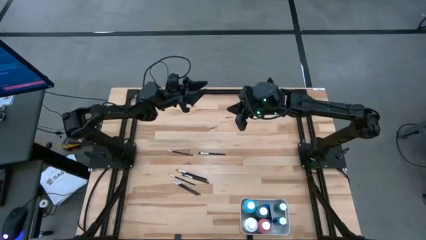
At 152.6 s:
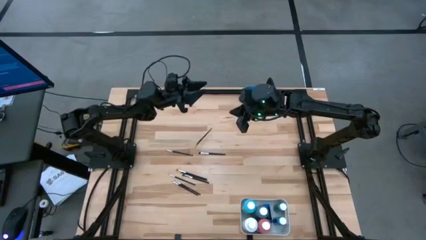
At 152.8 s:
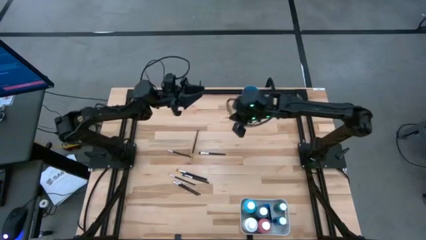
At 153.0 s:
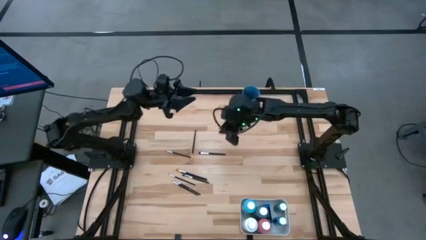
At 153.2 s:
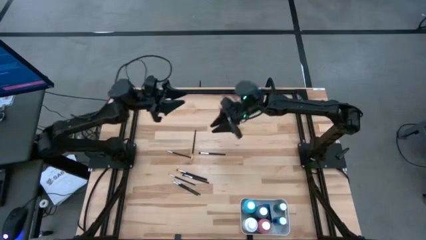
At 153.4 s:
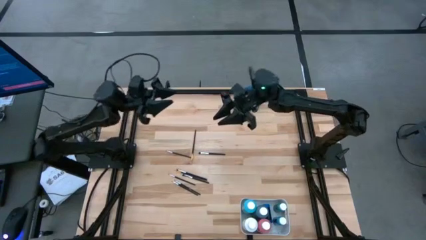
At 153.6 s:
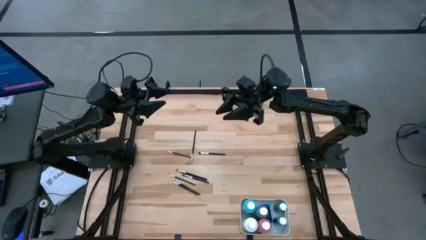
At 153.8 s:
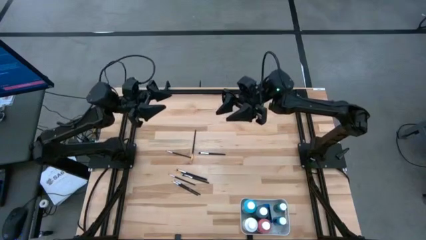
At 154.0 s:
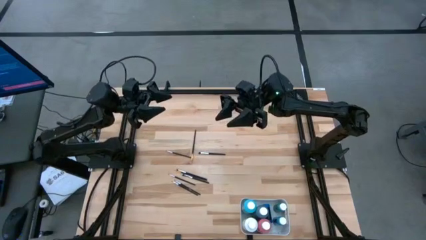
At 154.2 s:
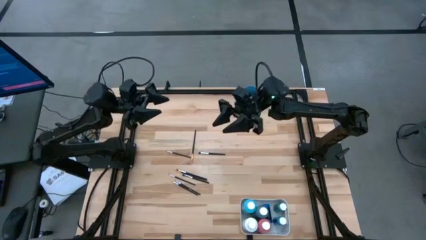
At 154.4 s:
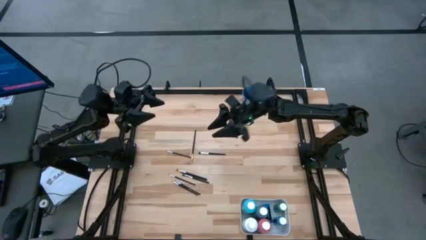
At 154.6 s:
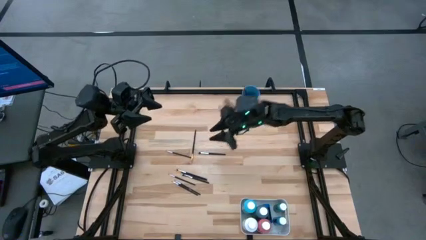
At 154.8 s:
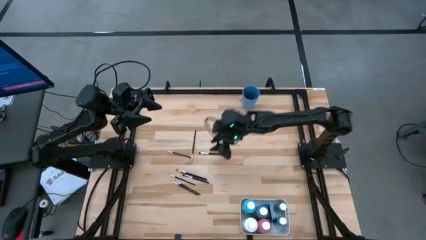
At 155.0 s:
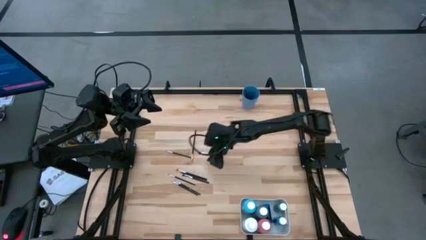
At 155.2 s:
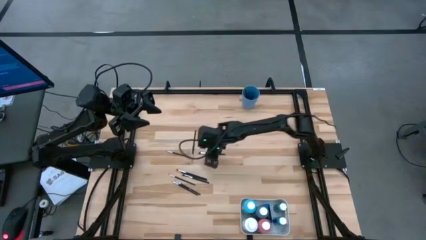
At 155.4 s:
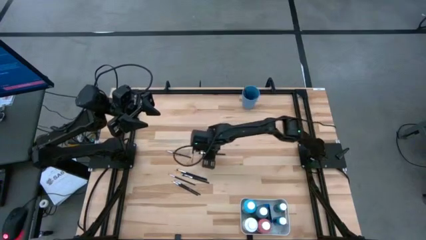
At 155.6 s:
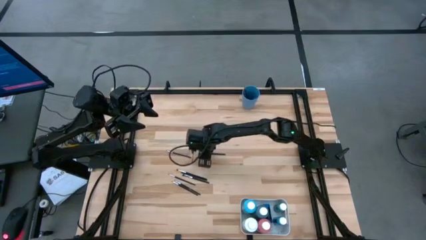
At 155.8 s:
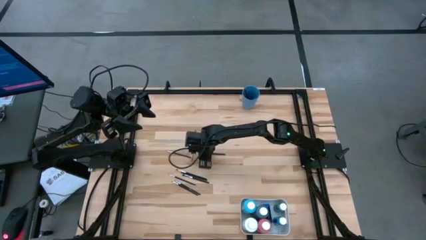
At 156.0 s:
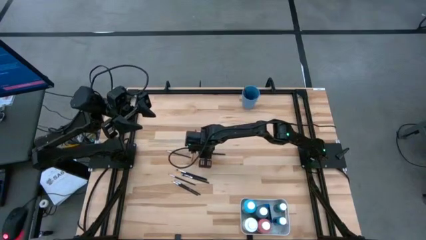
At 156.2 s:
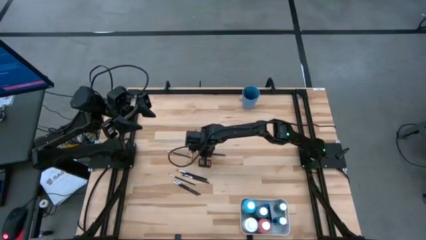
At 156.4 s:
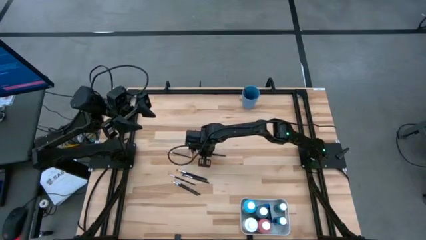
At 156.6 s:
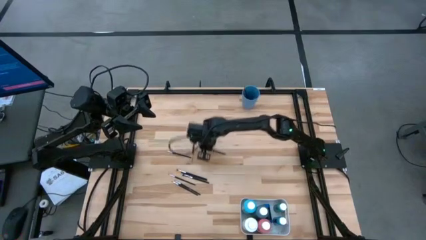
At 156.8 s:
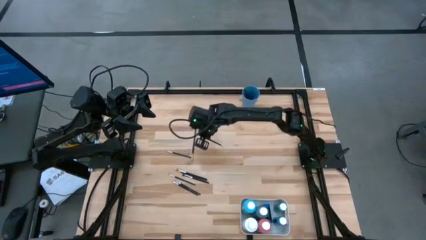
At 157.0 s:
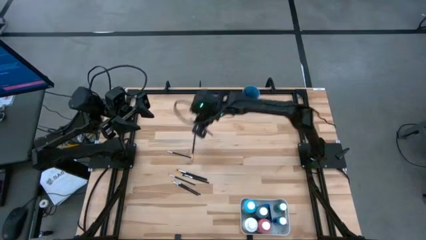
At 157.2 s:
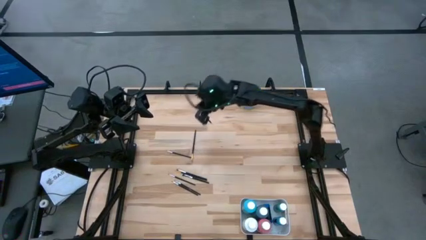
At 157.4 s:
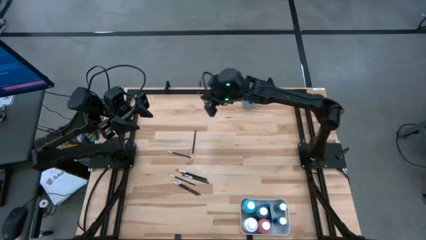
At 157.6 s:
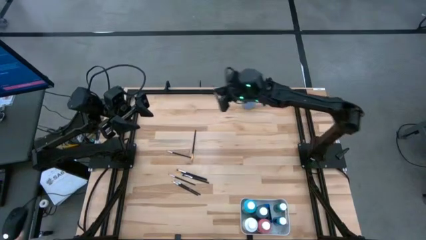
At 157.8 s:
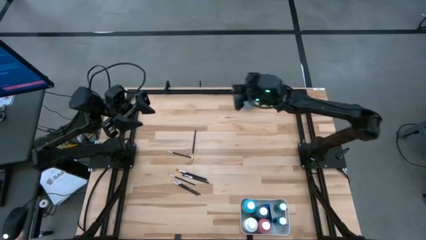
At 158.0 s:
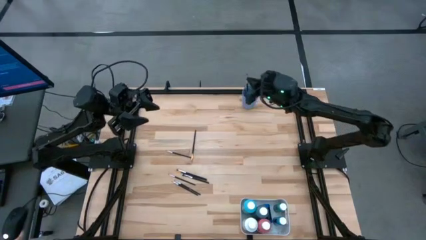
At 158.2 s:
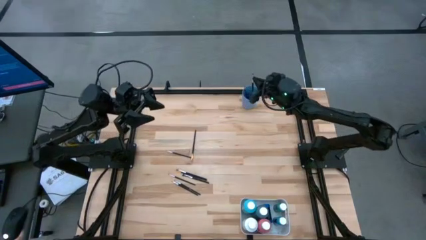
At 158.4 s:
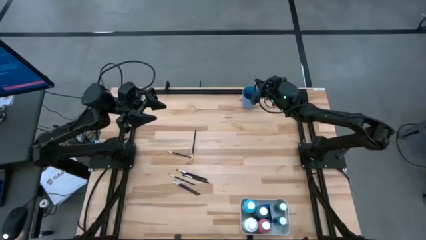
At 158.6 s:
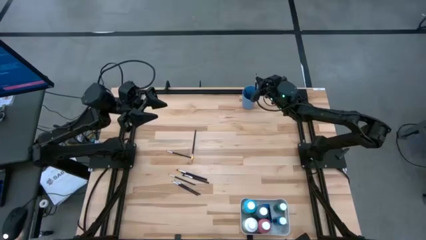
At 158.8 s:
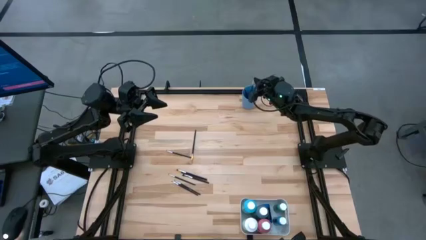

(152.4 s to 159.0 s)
Task: Pick & Place Paint Supplies
Put the silver paintbrush into the blue cup

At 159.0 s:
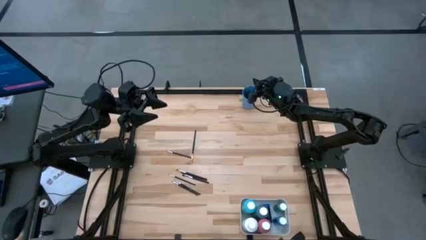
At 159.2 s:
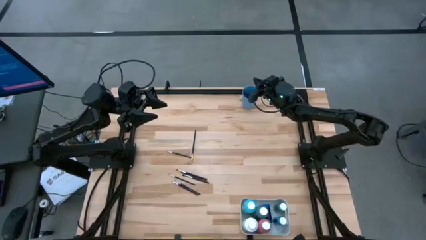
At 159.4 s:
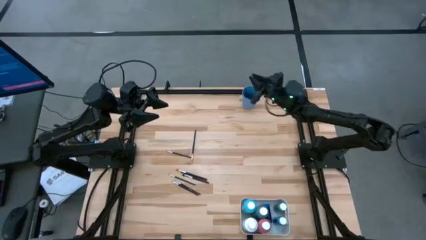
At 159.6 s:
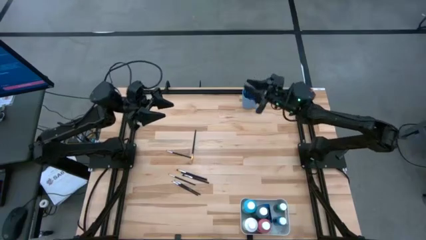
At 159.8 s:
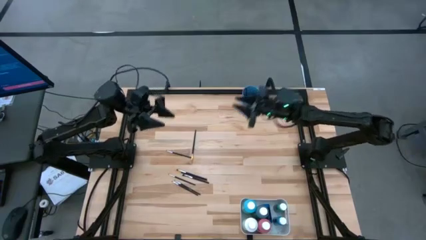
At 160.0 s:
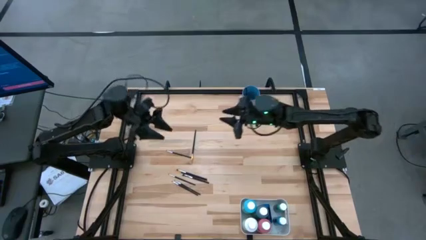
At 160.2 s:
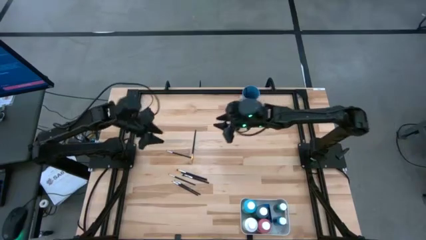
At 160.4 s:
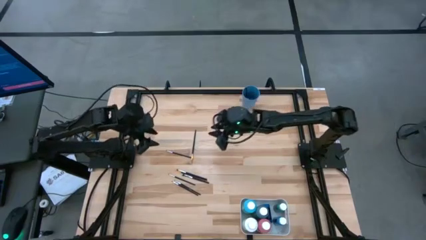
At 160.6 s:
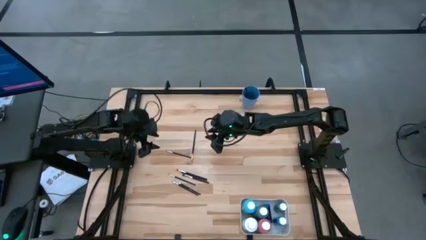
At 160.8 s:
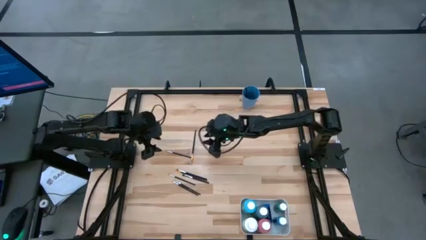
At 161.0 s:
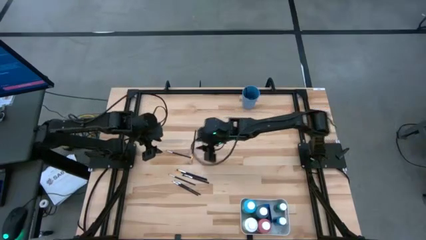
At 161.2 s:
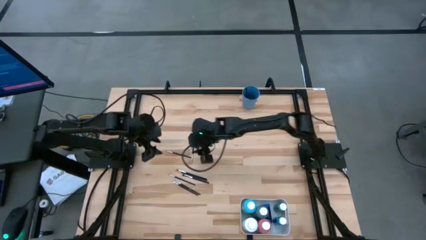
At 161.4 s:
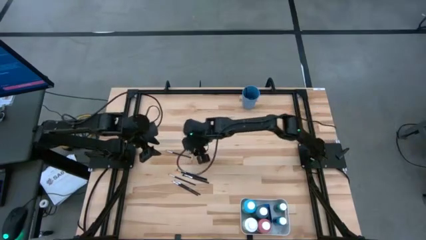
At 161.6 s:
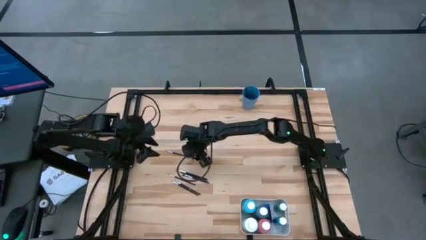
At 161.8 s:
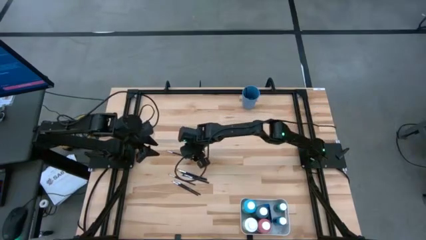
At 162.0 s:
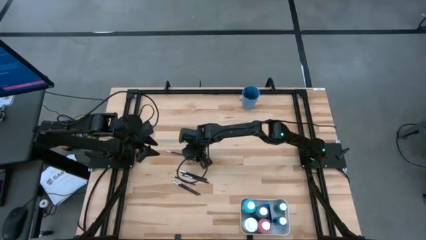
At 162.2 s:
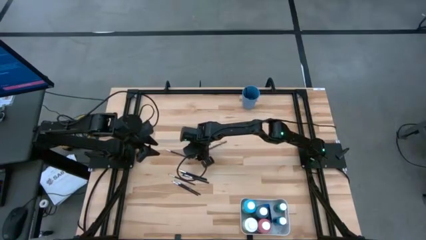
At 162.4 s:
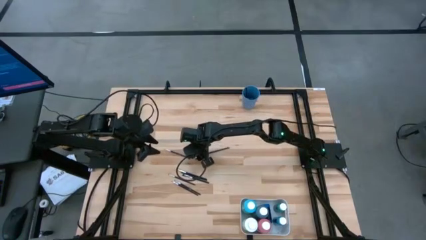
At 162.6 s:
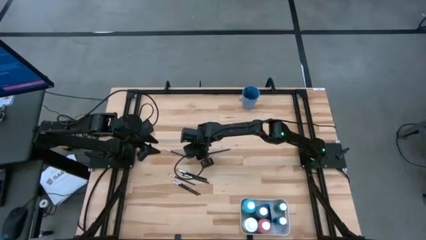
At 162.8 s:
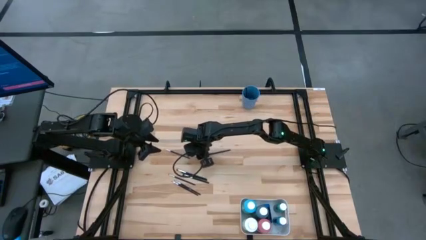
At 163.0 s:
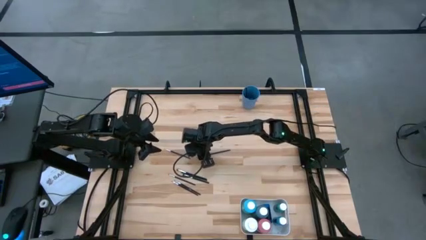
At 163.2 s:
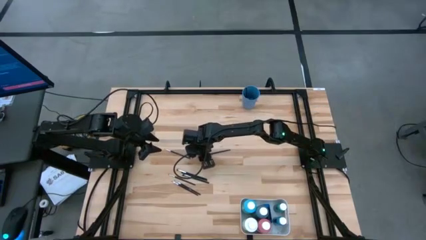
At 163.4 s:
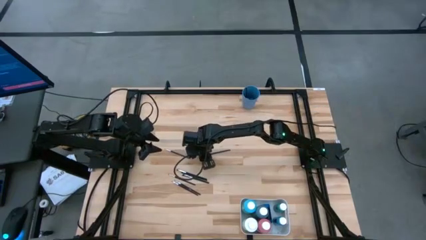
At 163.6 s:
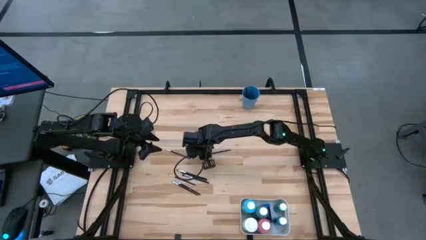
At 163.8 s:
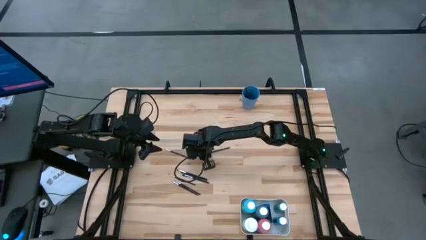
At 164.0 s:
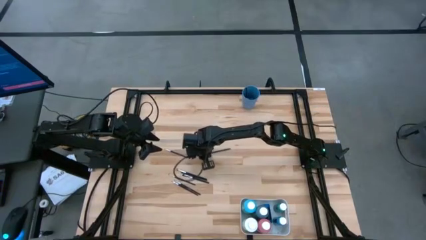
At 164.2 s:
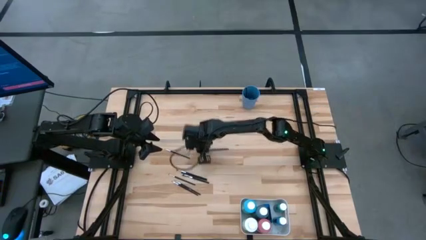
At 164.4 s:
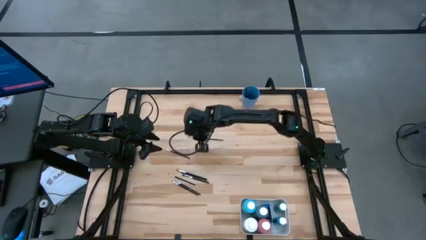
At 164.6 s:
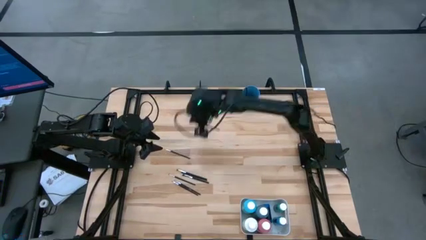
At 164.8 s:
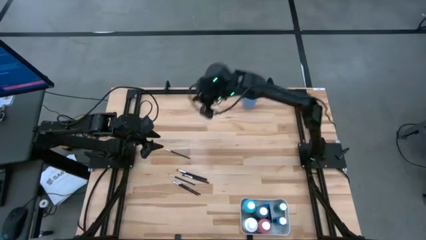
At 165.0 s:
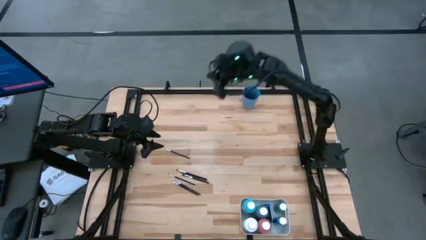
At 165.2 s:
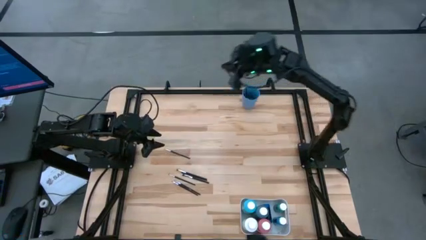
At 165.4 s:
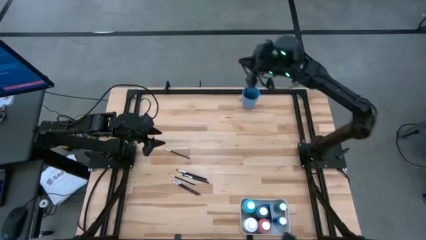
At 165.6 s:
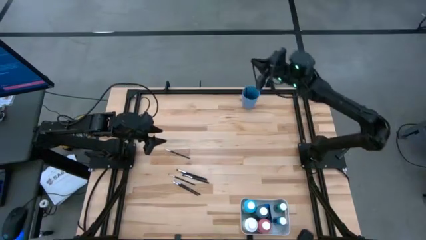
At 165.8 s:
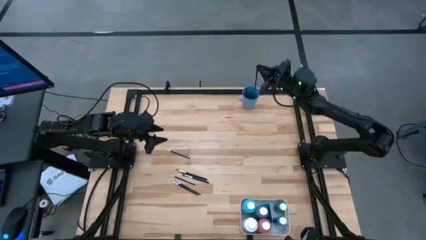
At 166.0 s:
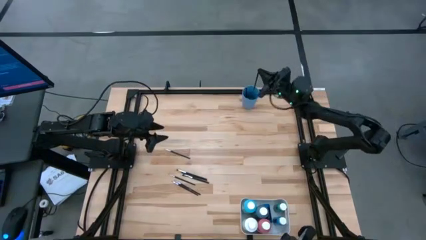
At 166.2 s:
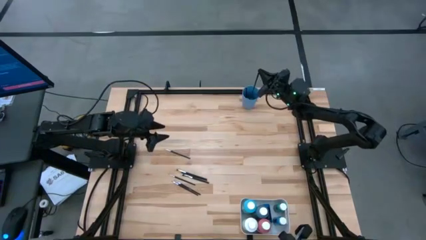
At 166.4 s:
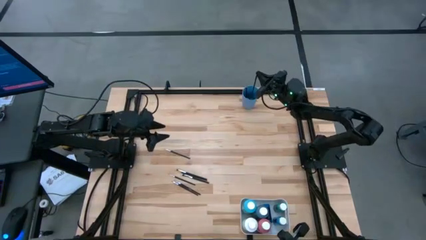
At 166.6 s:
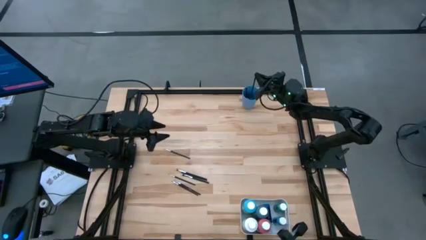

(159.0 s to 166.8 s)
Put the orange paintbrush into the blue cup
